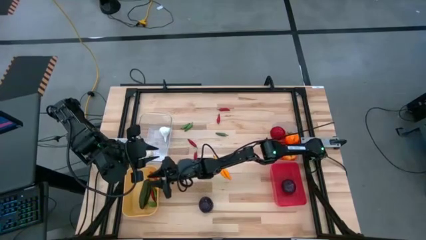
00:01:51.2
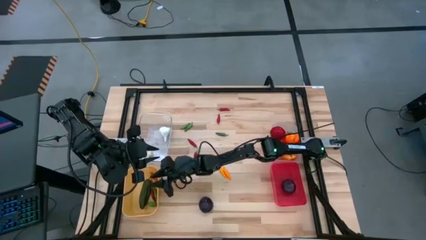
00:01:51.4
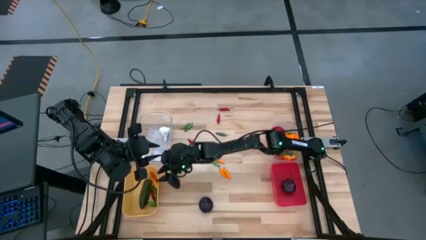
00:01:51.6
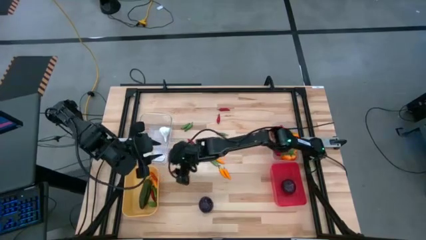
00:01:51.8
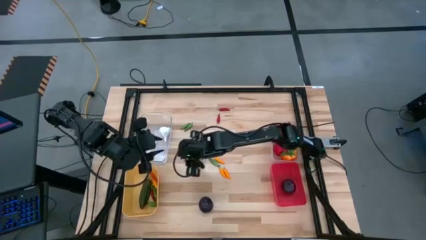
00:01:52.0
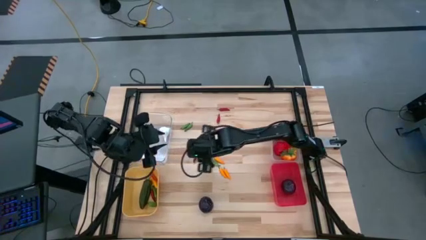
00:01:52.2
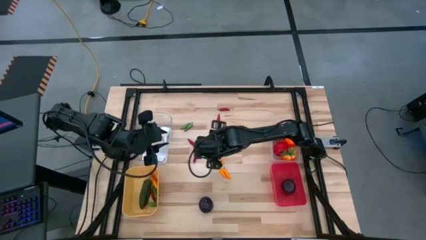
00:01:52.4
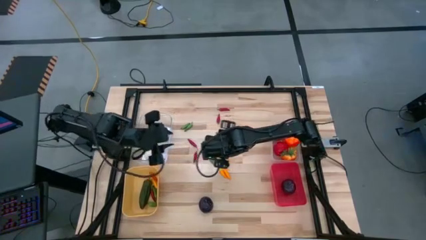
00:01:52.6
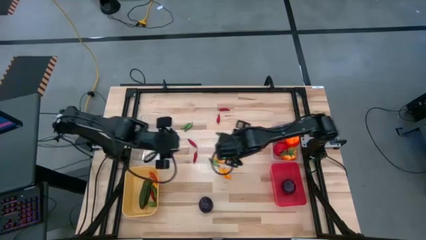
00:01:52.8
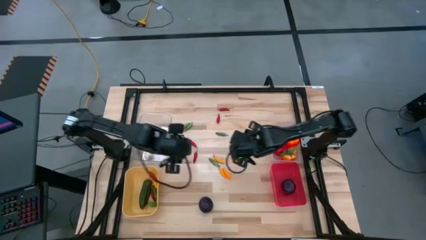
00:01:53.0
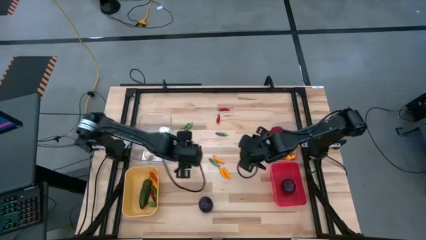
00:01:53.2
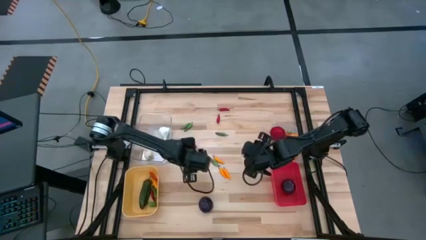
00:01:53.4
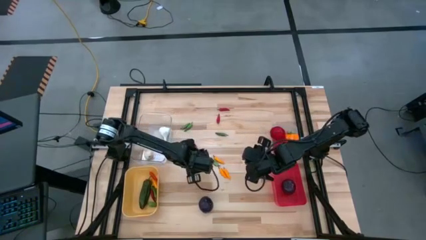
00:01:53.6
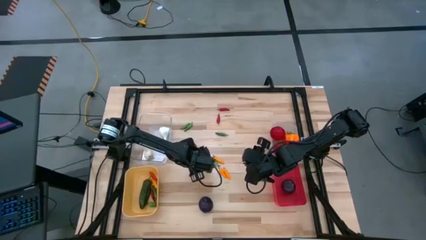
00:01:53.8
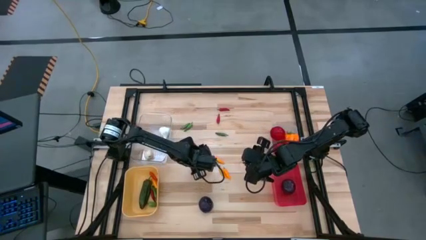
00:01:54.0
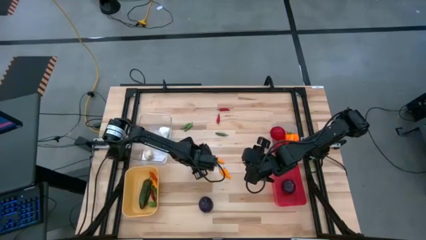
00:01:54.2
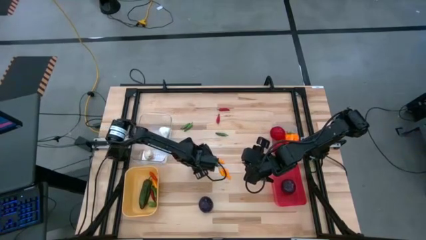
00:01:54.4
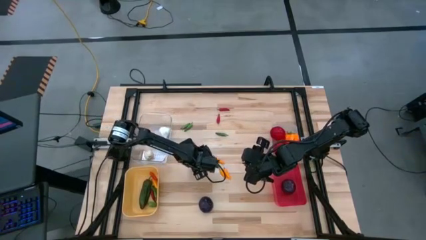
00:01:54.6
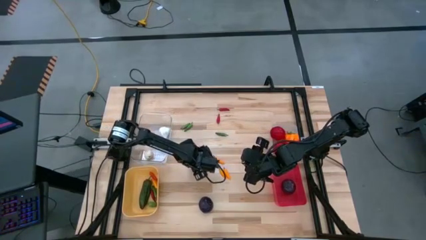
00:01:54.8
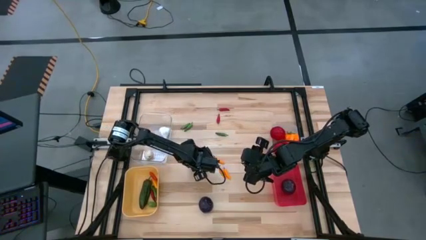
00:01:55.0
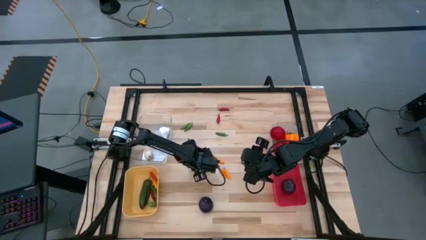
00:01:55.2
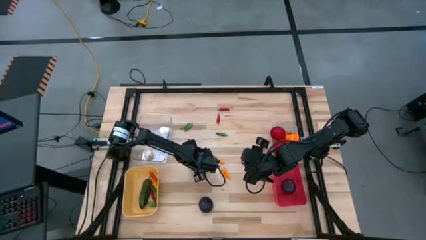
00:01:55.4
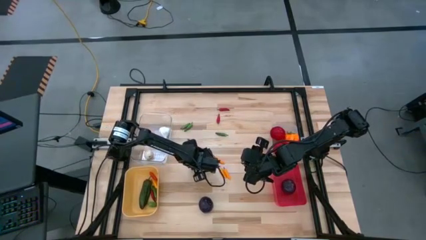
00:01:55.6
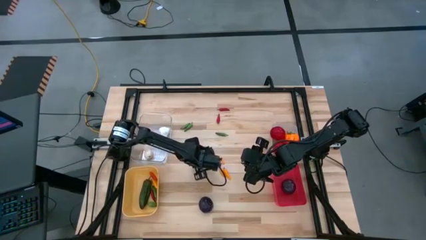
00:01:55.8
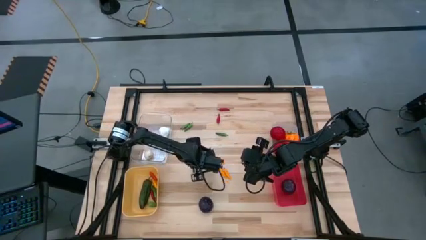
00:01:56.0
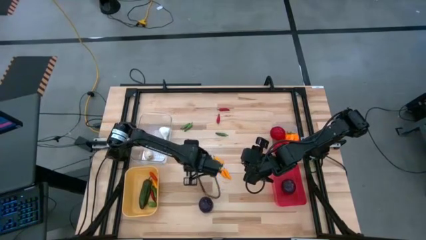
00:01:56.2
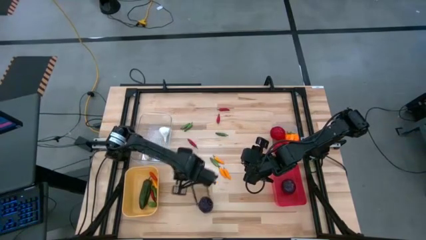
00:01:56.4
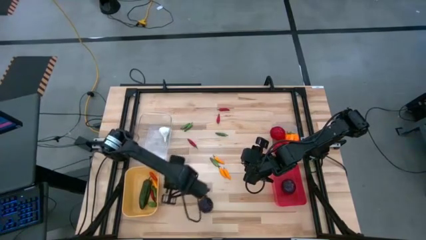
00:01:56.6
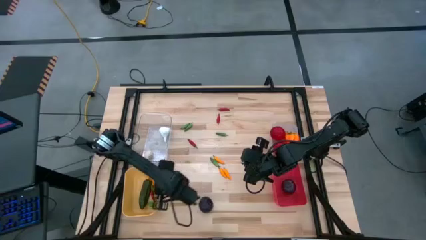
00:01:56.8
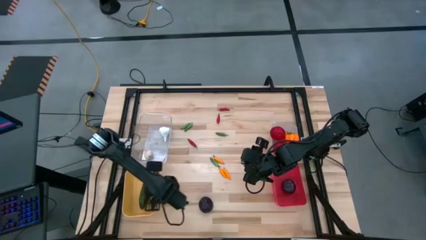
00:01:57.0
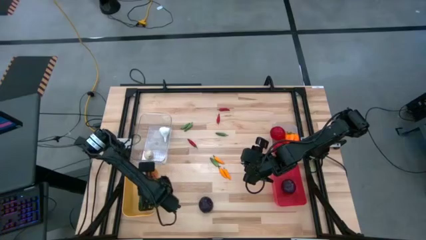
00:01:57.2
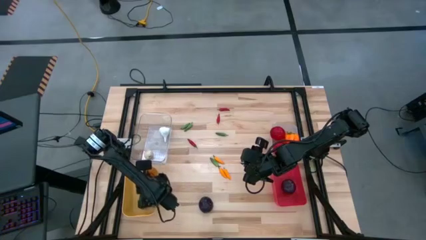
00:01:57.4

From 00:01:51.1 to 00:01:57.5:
Task: Sort produce into baskets
Put the red chili pepper into the yellow bin

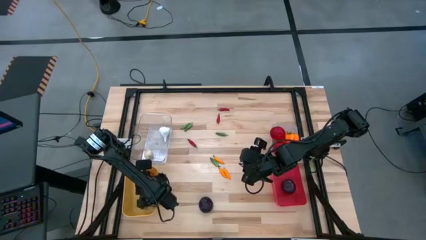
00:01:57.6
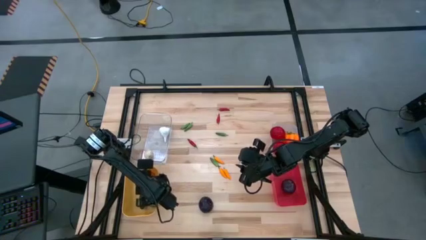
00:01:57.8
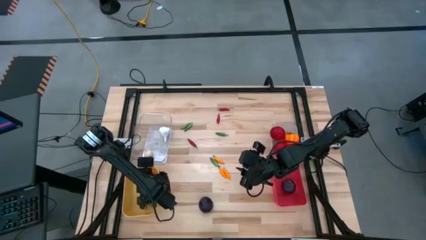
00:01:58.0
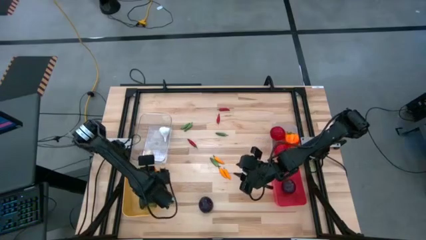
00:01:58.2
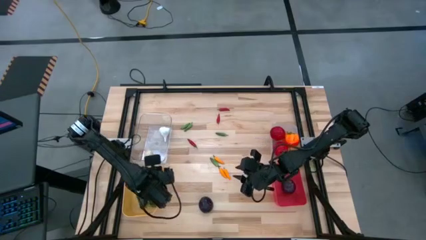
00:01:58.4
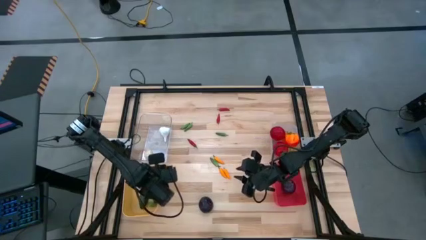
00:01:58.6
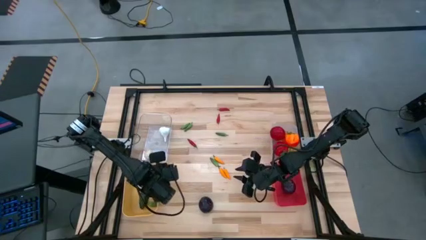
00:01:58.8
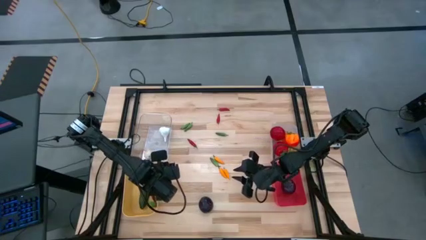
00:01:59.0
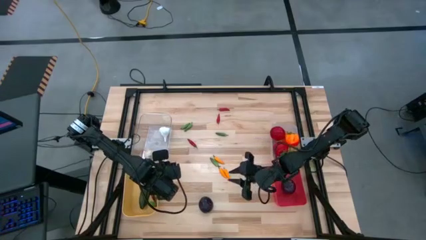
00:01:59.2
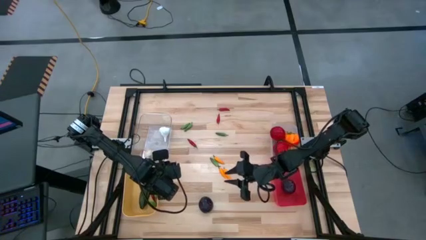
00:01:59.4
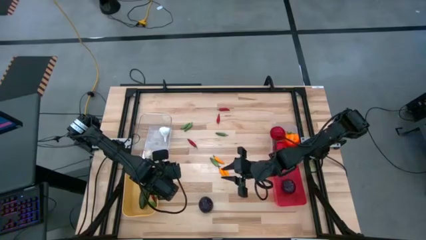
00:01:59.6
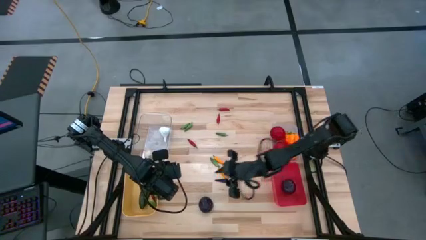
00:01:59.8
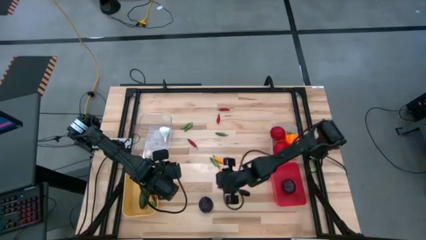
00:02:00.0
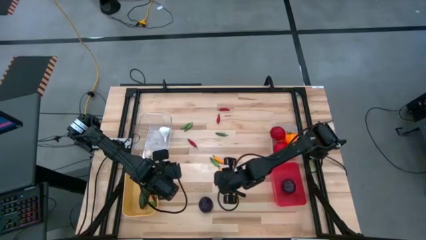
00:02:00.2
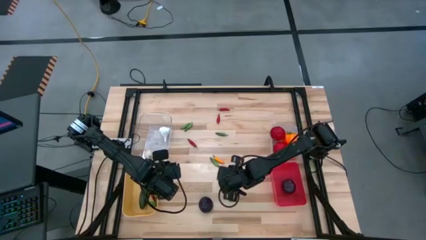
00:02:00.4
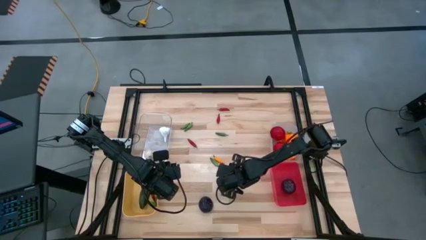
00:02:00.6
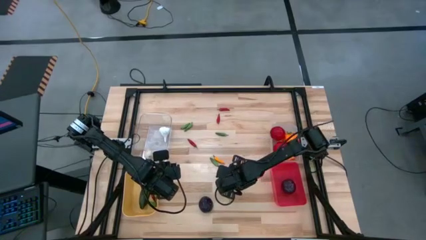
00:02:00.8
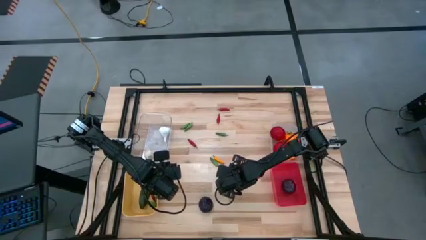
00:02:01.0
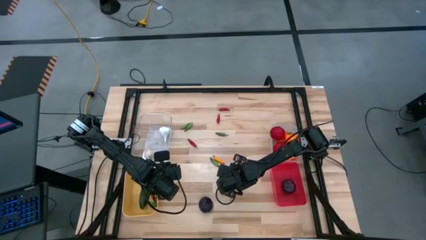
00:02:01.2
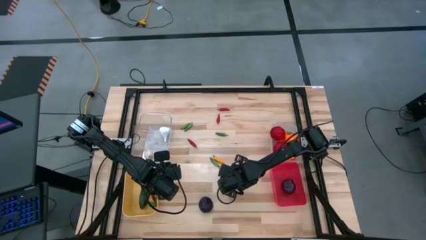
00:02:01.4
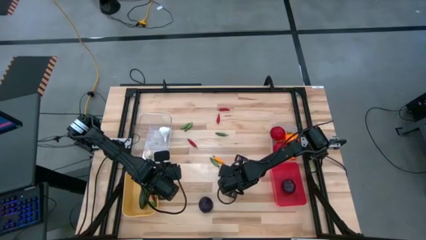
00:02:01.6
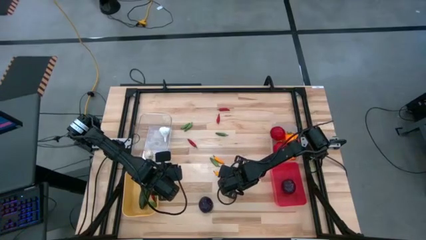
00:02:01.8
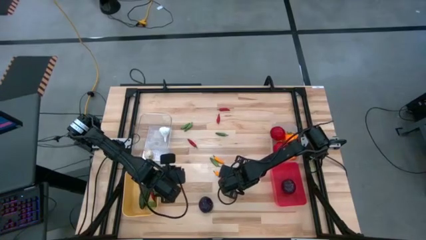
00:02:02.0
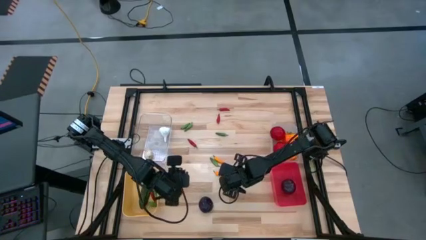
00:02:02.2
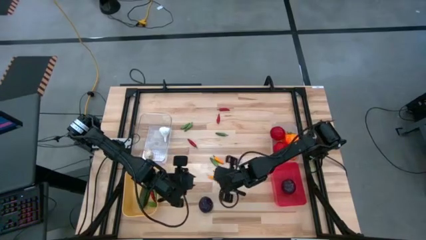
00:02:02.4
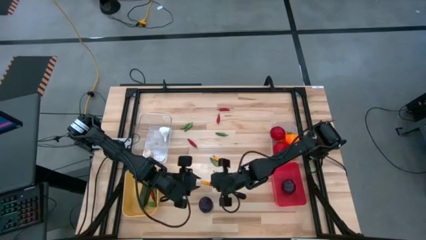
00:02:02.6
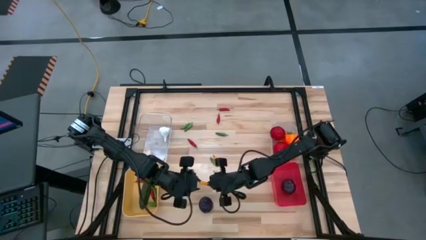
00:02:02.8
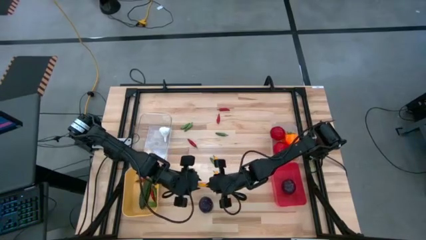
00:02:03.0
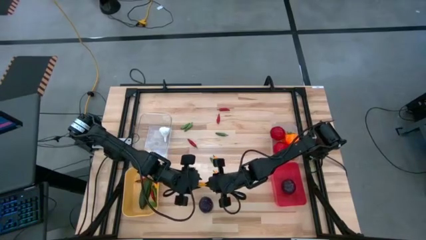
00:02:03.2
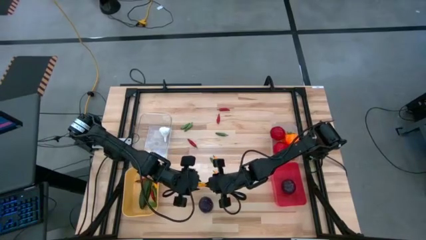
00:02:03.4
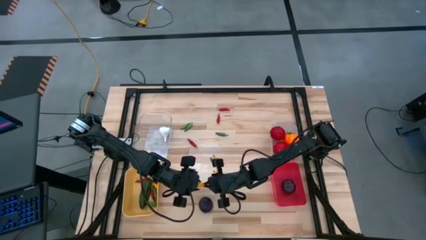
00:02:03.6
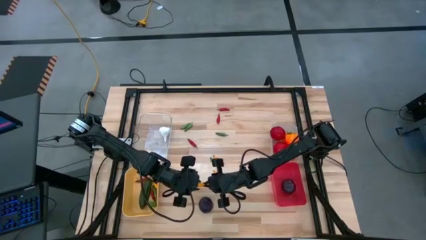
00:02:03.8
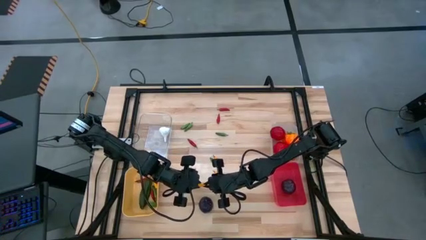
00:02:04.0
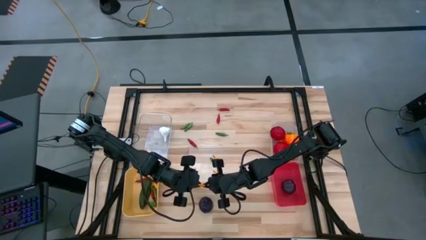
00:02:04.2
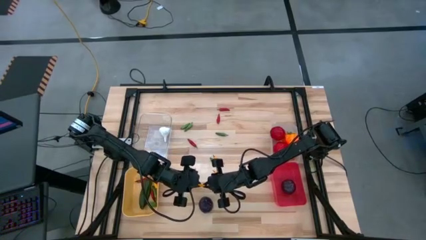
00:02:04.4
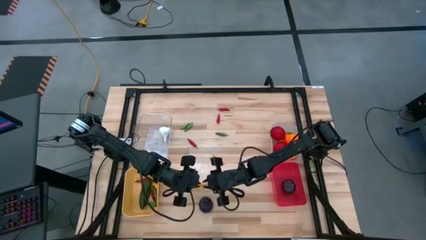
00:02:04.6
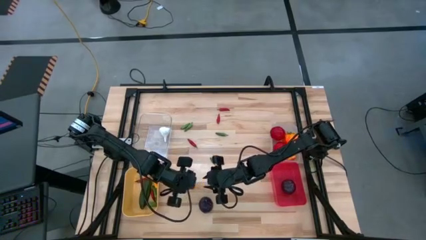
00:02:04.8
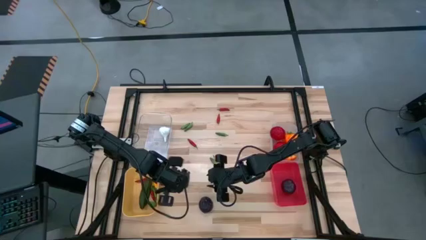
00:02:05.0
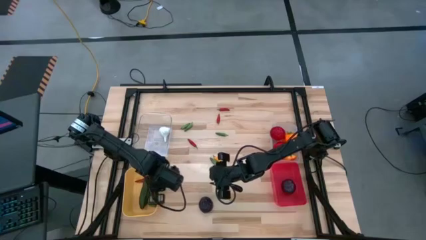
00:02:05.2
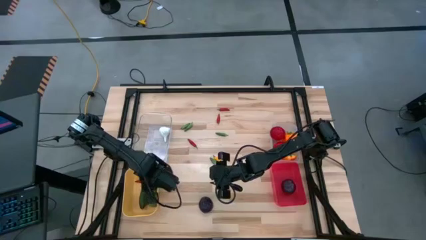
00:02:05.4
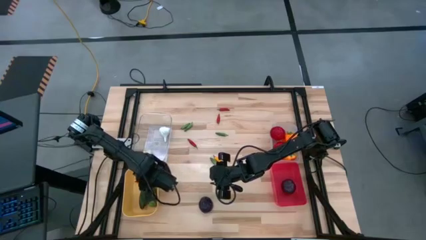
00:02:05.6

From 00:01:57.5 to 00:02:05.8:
Put the yellow chili pepper into the yellow bin

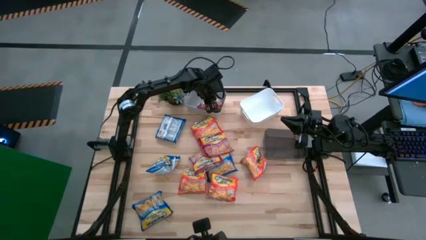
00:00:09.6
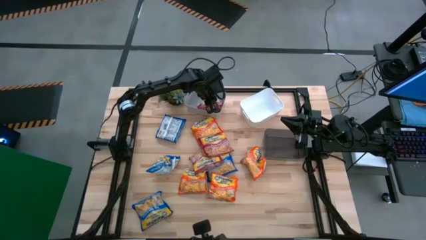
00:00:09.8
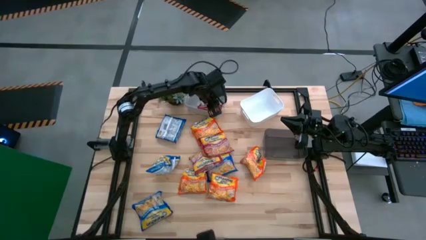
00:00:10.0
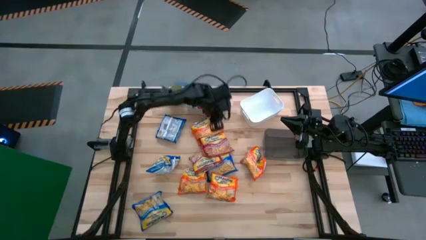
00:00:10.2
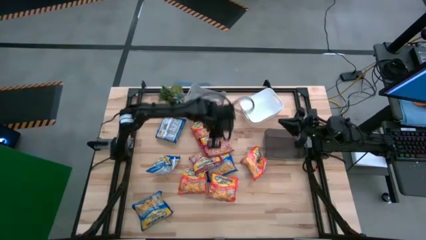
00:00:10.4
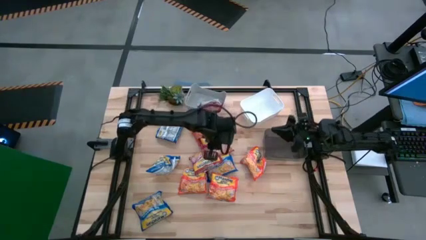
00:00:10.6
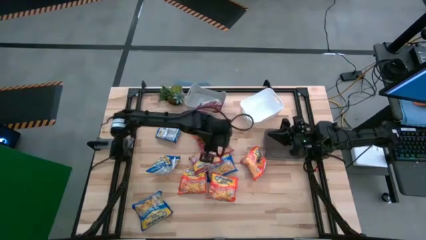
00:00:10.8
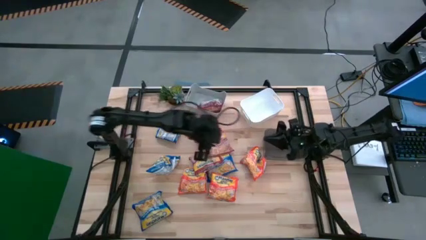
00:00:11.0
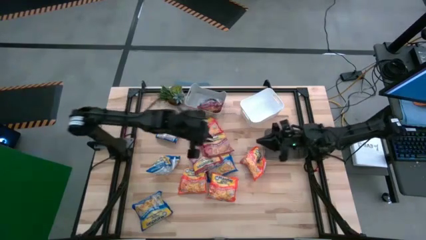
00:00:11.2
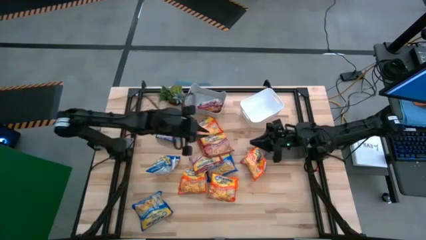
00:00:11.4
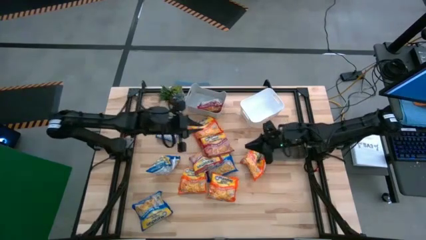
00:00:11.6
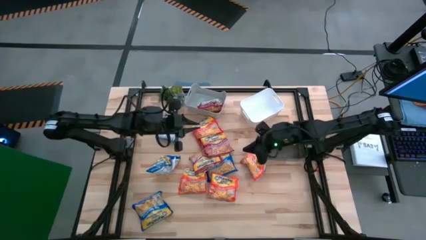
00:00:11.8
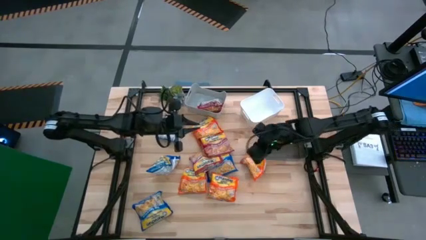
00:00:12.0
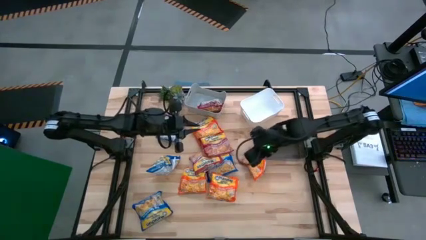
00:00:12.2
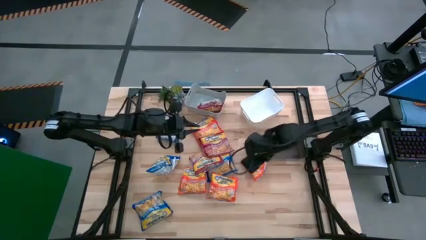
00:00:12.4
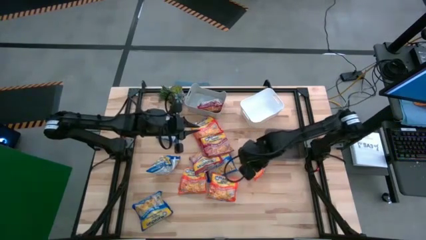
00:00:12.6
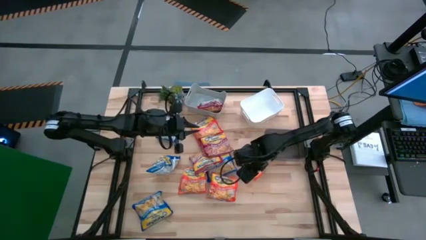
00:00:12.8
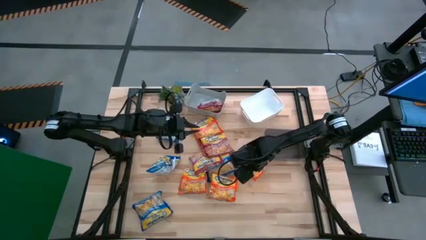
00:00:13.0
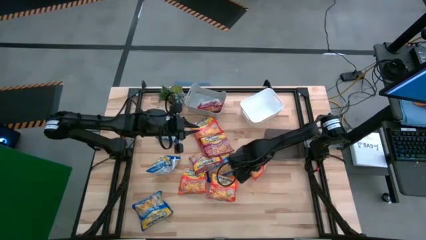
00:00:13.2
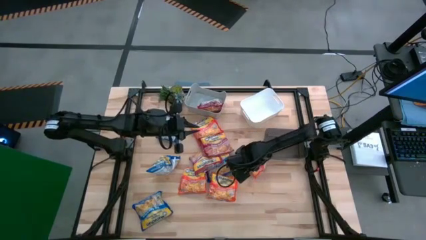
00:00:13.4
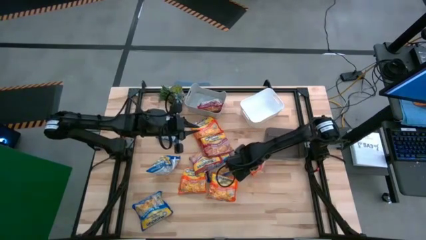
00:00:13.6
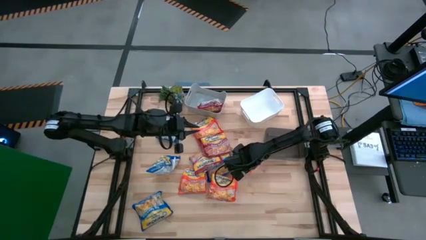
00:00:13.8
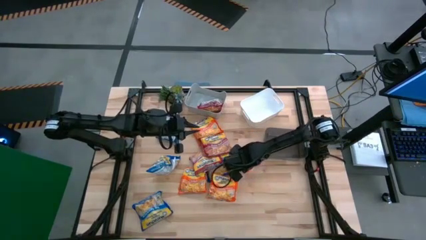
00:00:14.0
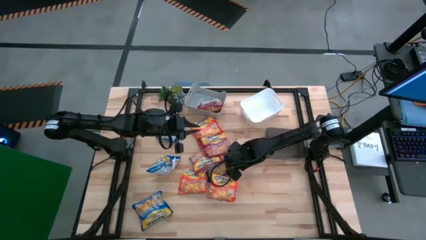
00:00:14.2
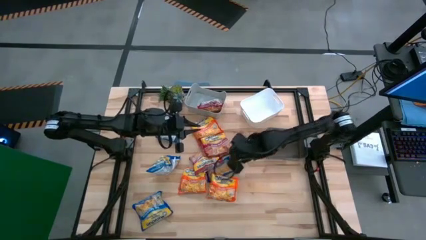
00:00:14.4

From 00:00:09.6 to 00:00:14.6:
Task: Sort Maruchan noodles
Put the orange noodle pack into the white bin
